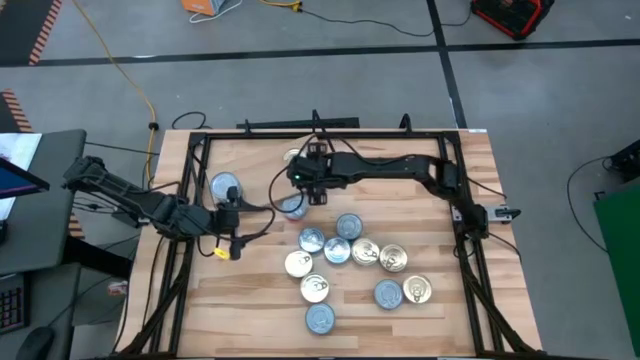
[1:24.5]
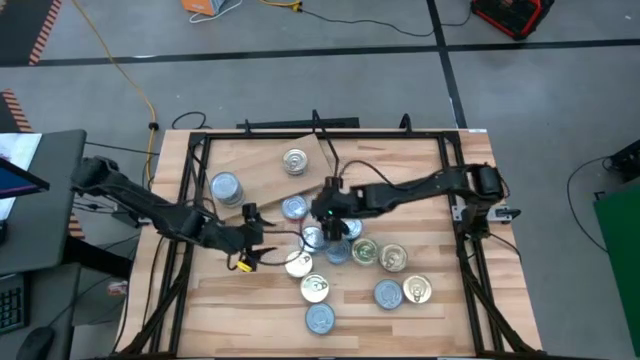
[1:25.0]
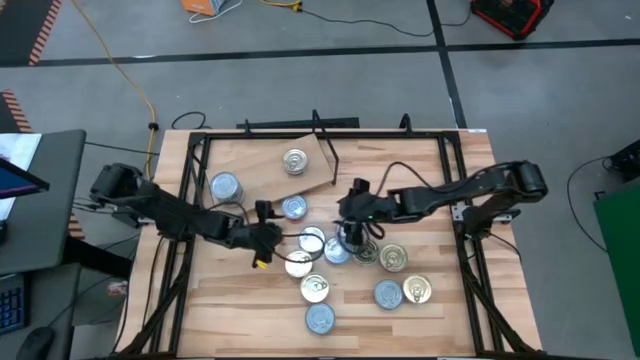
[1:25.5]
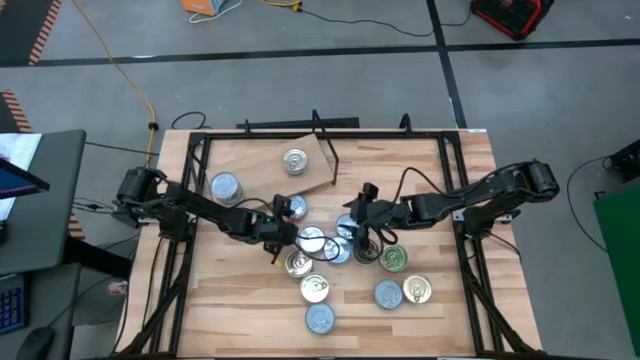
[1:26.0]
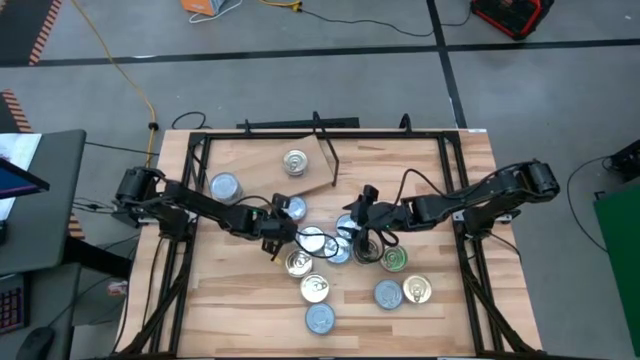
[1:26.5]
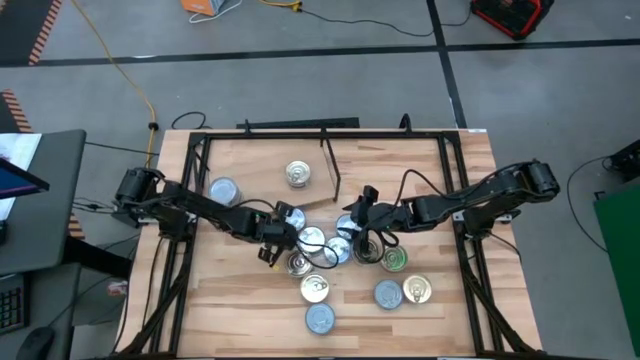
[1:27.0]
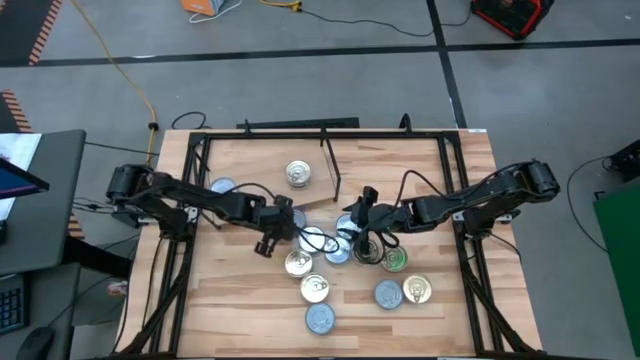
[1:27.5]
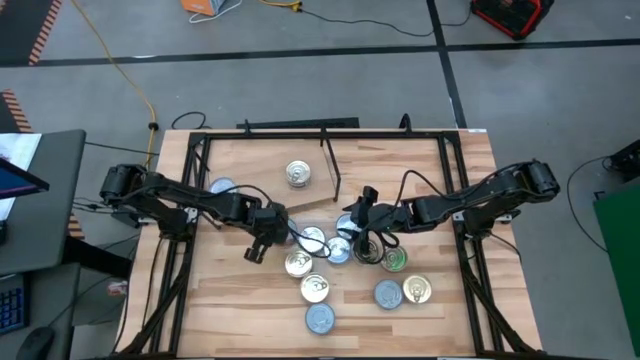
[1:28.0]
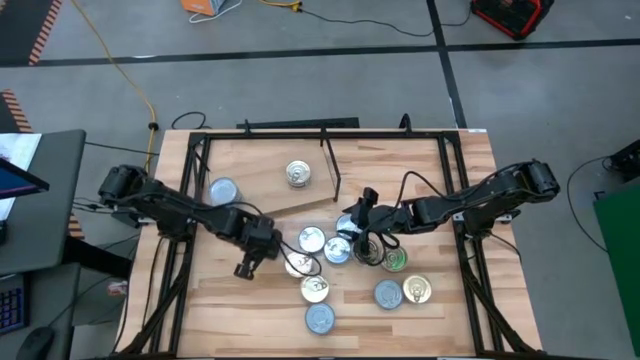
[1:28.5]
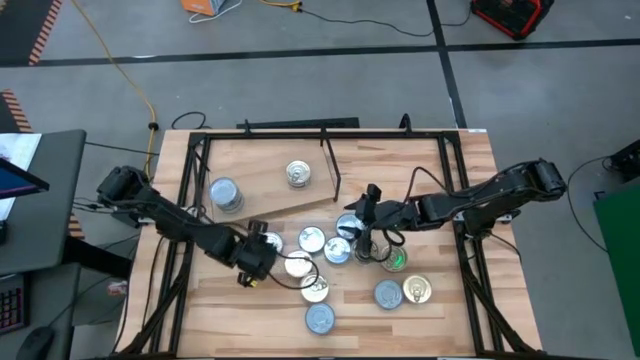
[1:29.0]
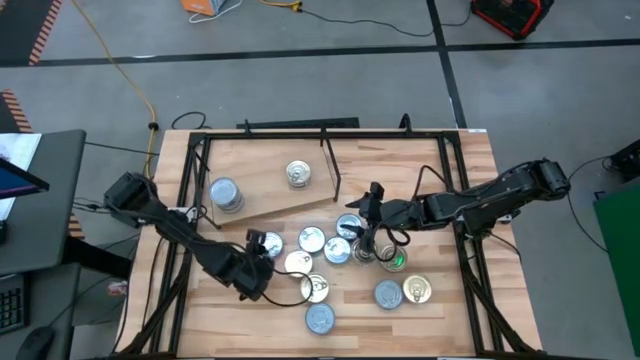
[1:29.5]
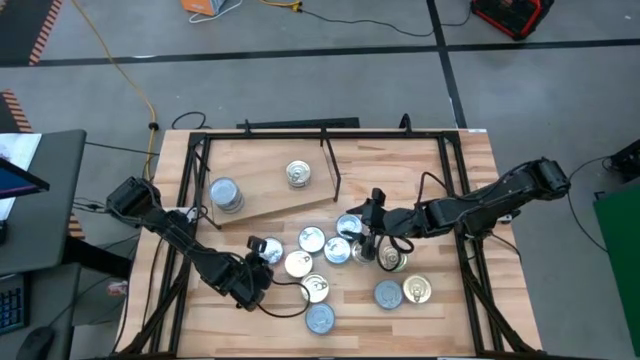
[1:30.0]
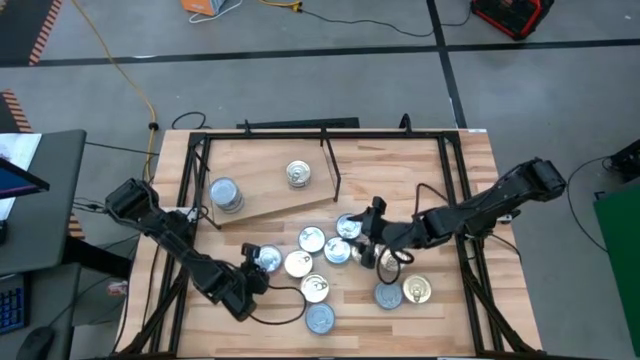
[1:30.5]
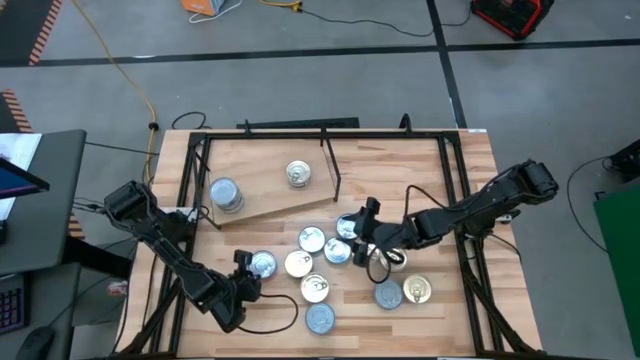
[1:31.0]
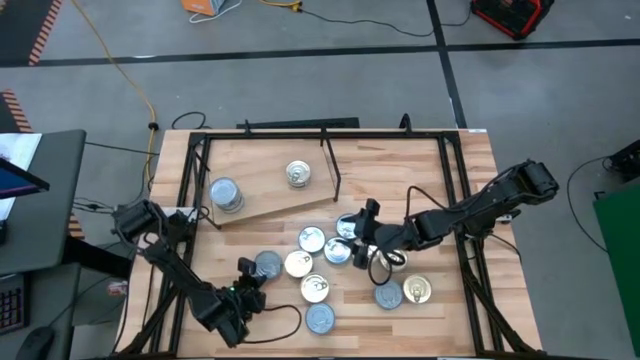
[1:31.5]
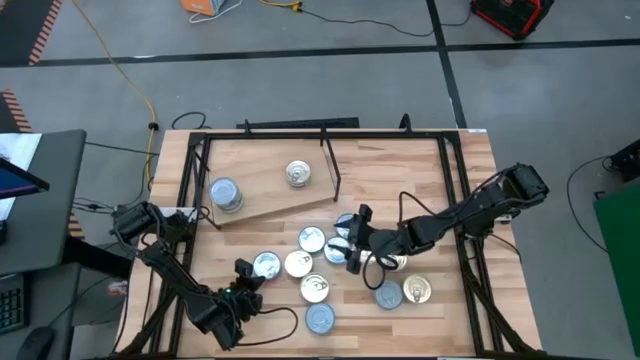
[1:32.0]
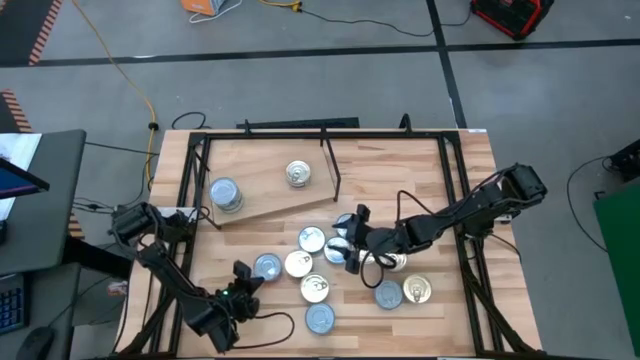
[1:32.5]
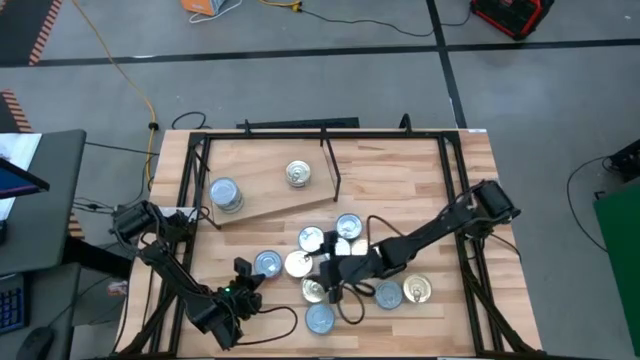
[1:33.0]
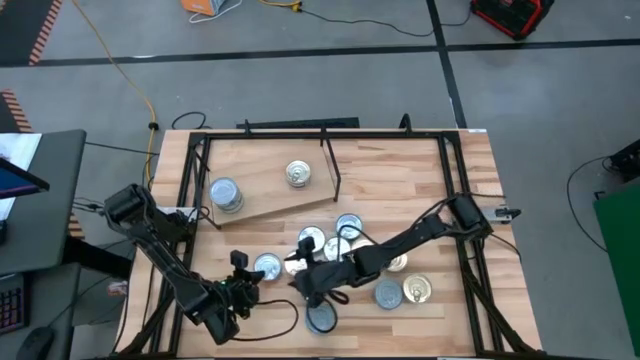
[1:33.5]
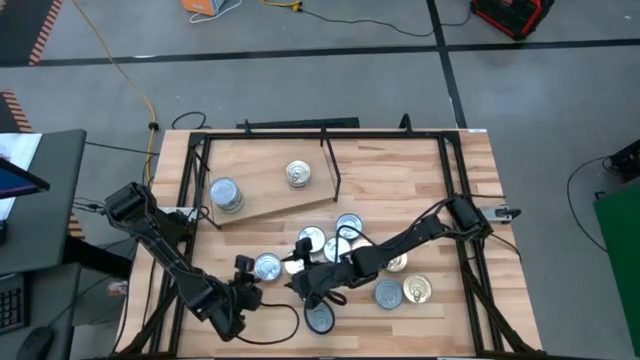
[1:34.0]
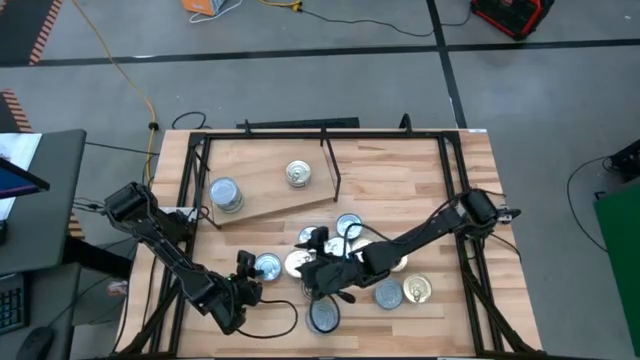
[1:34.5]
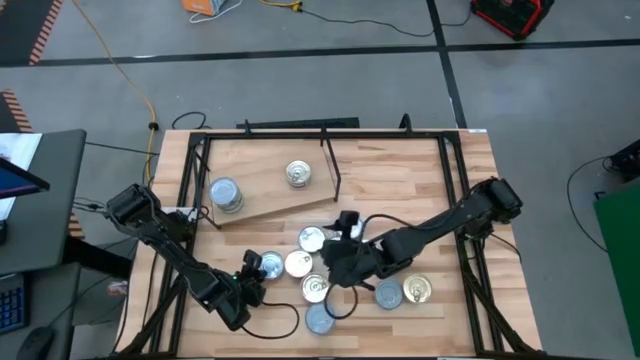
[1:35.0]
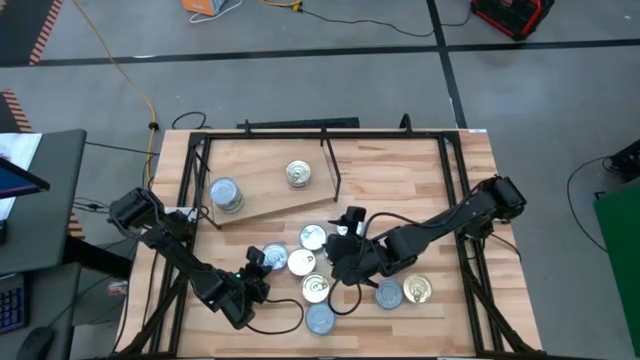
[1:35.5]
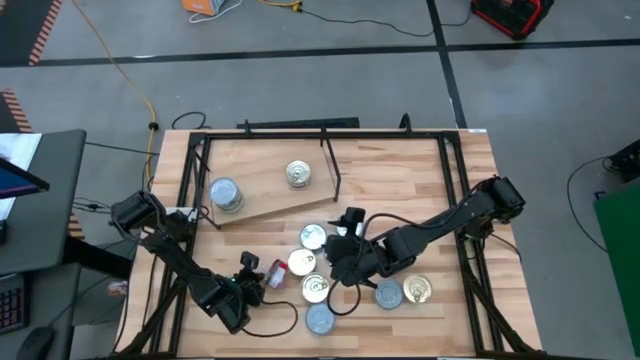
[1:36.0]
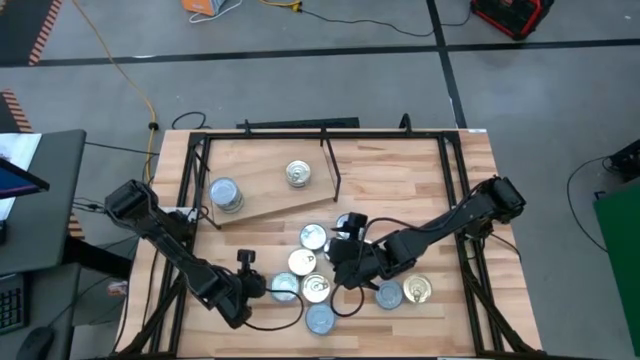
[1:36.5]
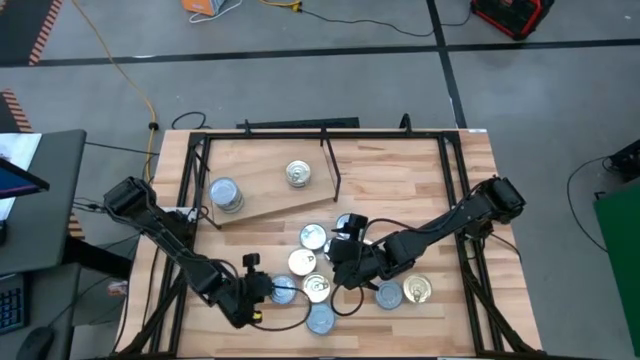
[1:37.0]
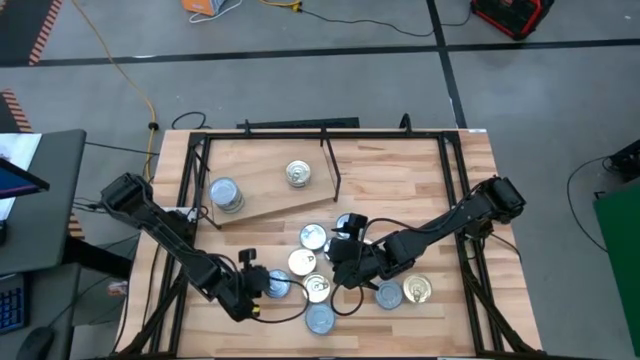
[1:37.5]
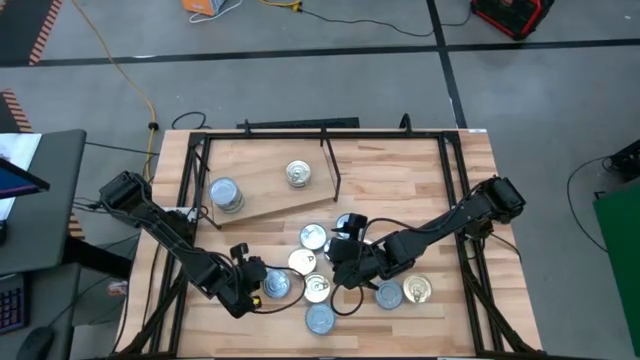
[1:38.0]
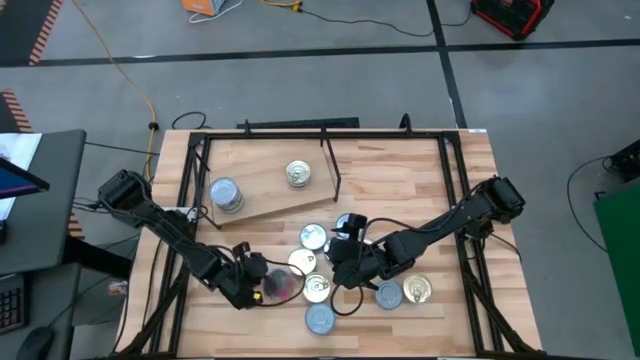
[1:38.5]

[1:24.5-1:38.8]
Task: Stack canned seafood by type on shelf
Put the red tuna can on the shelf

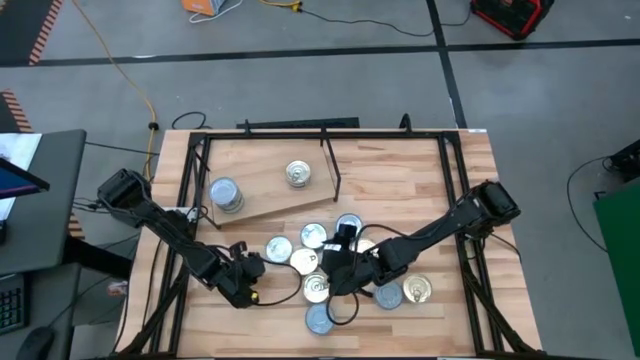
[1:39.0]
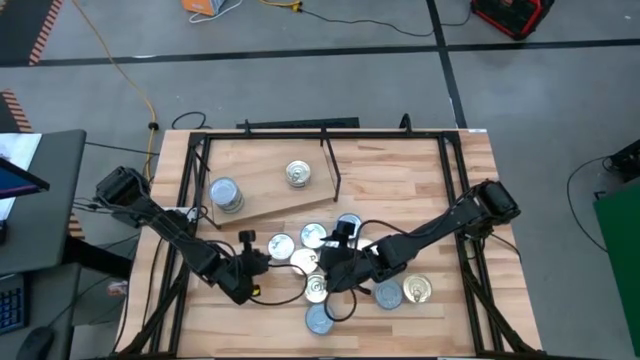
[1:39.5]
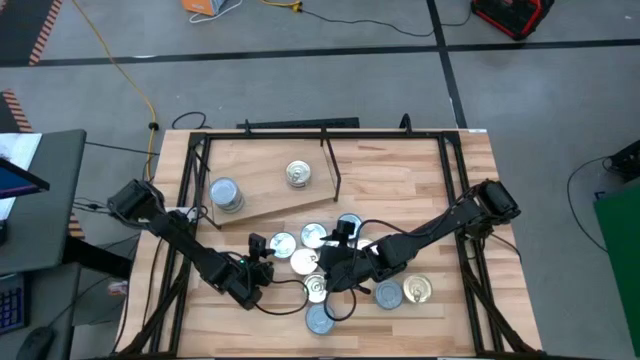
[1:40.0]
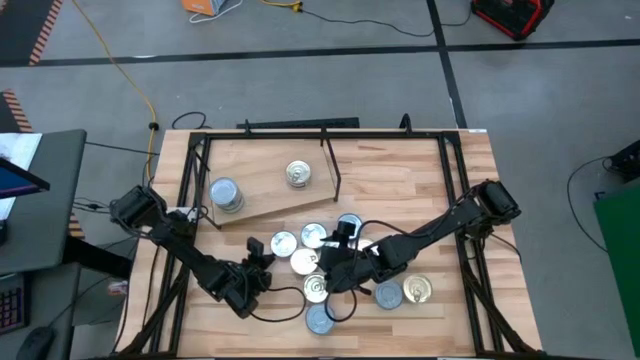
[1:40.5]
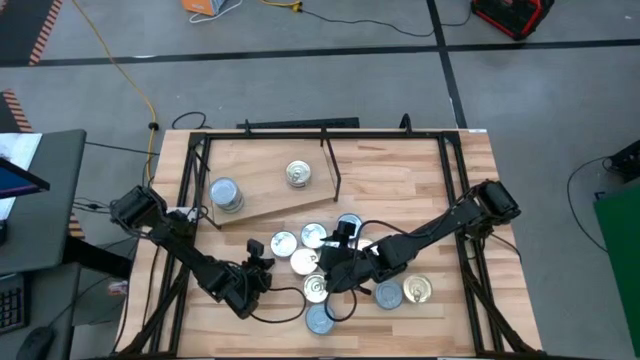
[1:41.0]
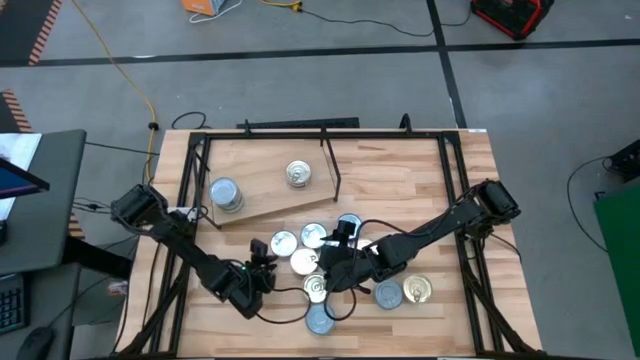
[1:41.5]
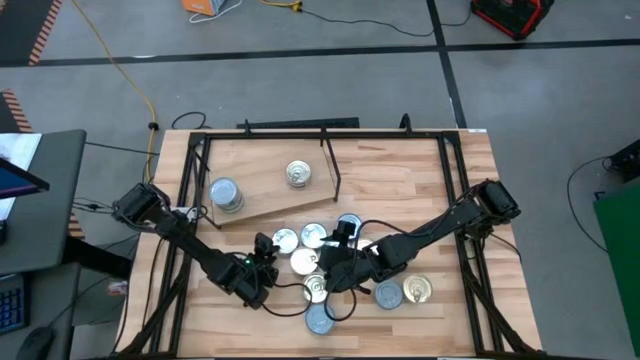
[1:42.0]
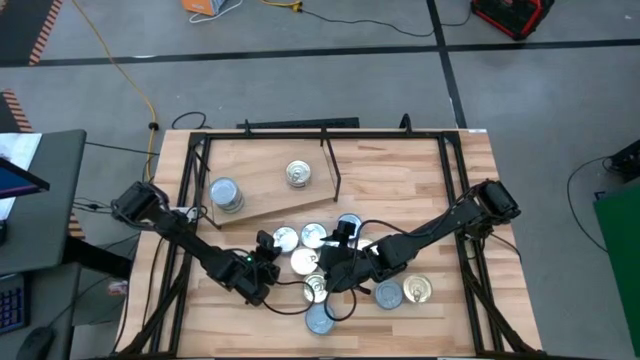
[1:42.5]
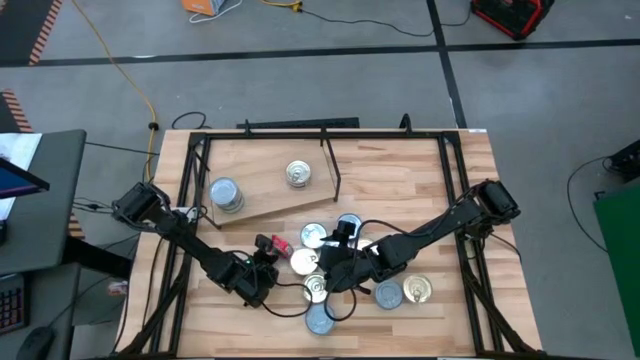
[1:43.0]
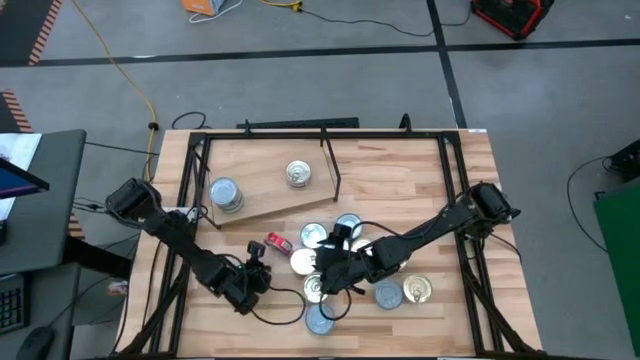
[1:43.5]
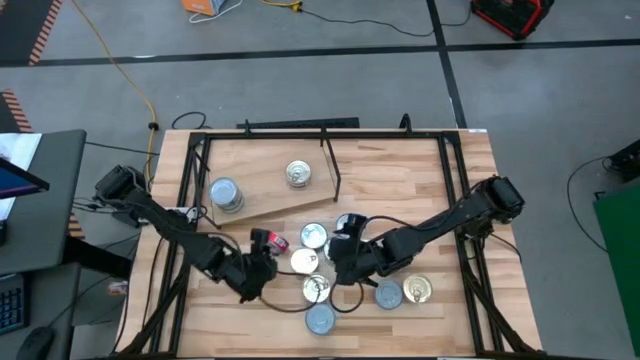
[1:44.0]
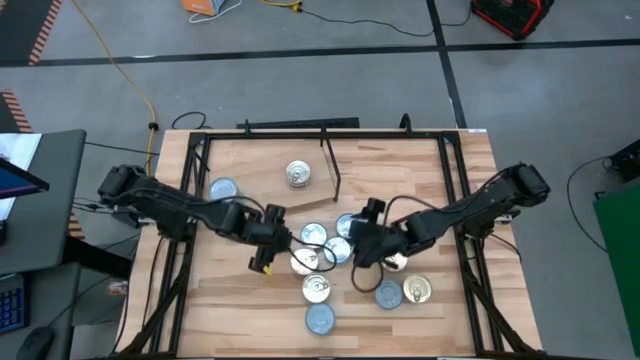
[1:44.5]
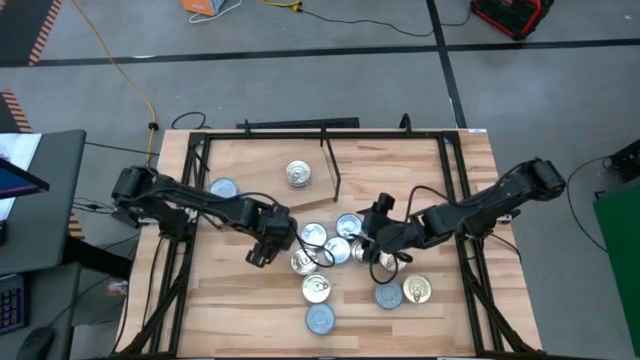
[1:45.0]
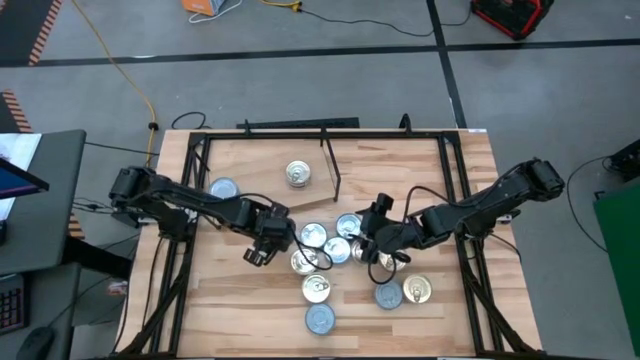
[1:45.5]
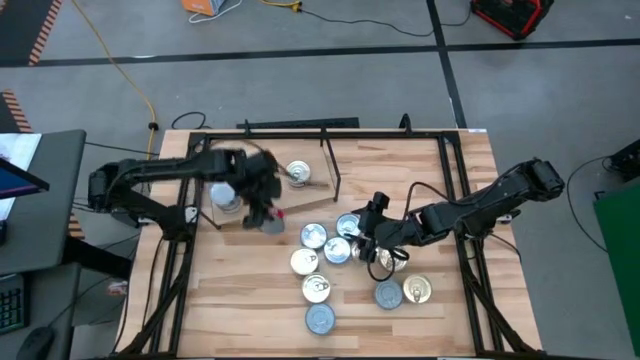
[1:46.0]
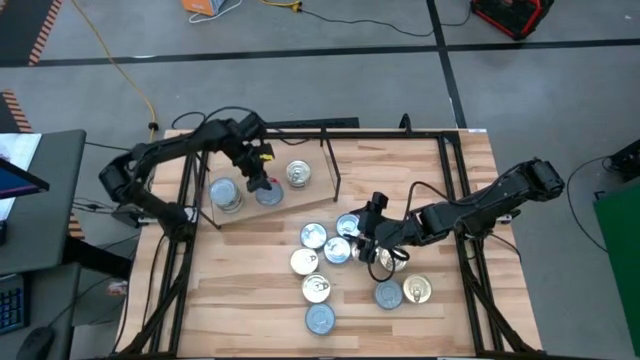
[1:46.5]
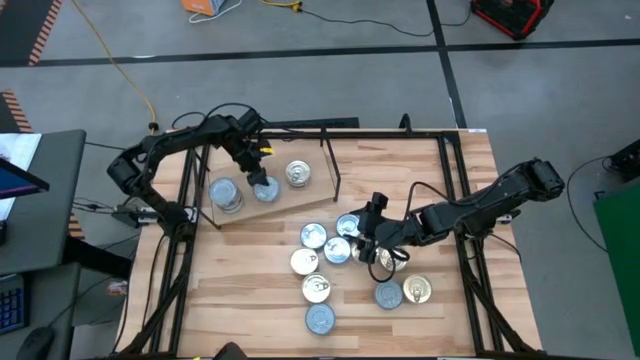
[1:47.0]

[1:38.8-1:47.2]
Put the red tuna can on the shelf
